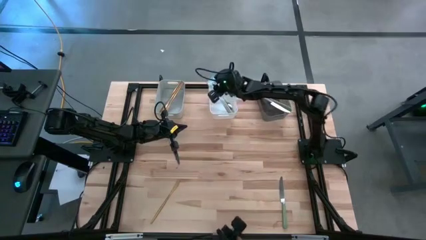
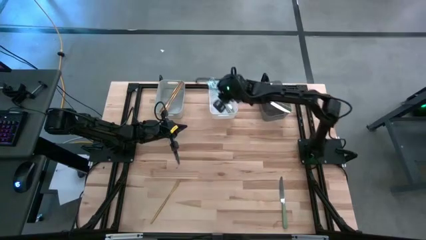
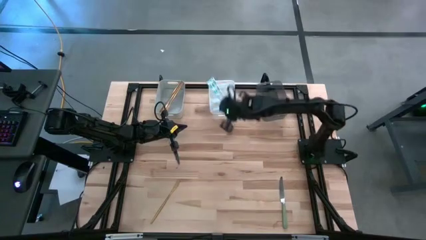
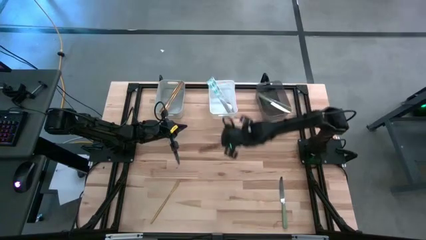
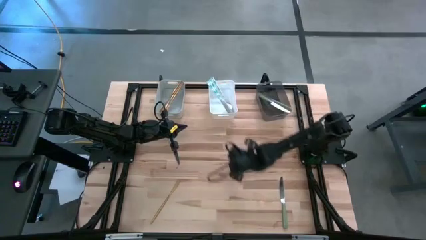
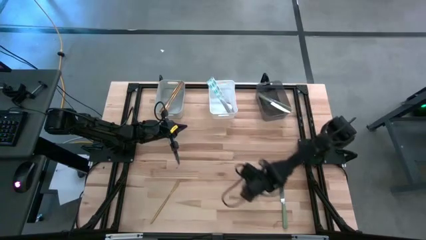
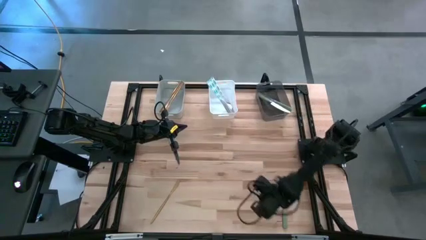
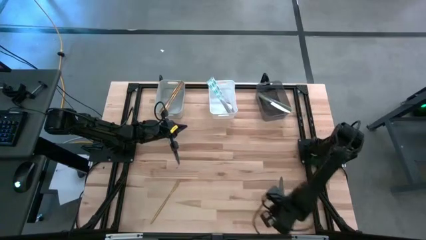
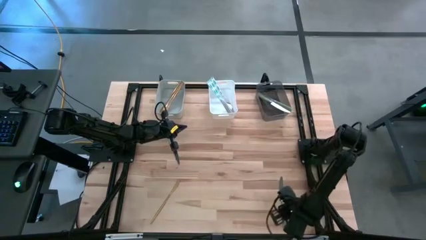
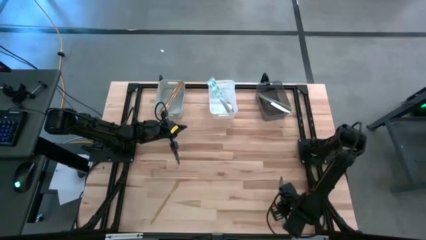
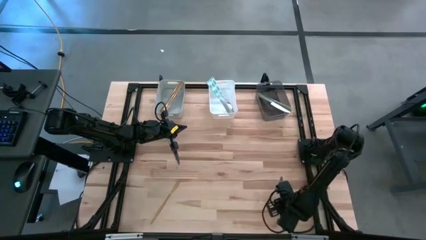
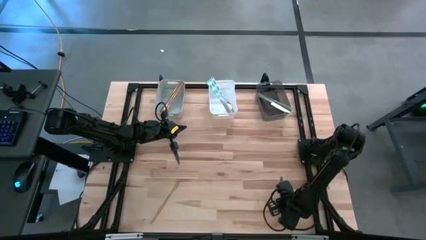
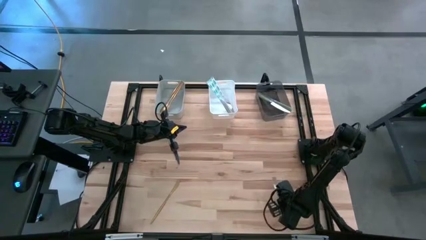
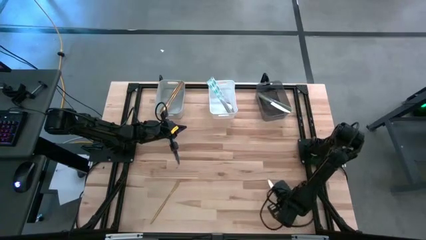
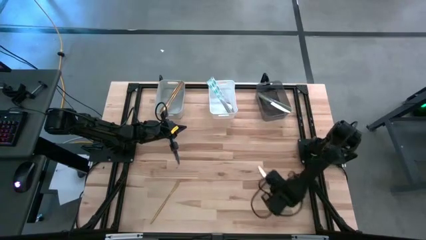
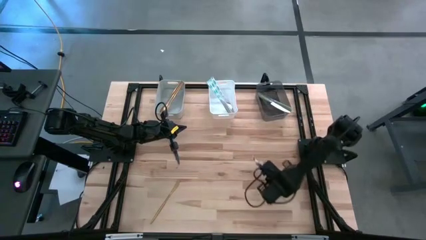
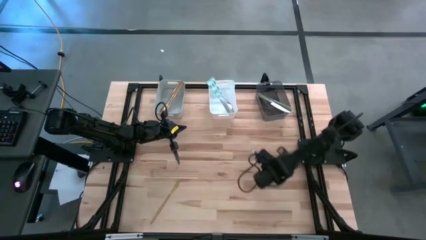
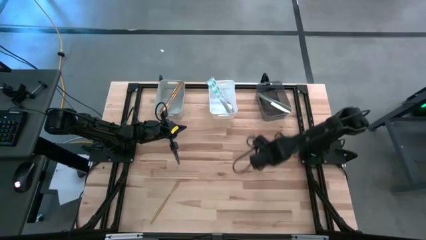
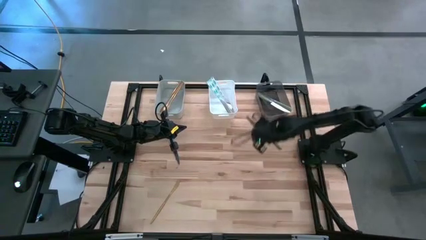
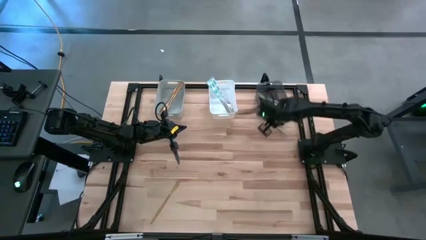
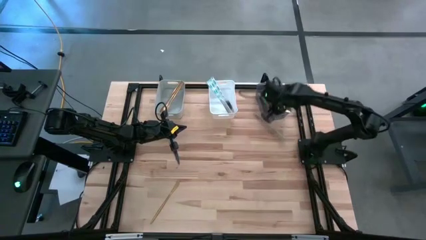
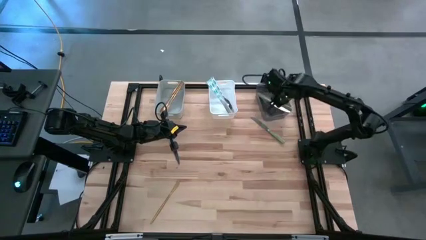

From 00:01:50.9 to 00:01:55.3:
Task: Sort silverware by color (type)
Put the green table knife into the black bin

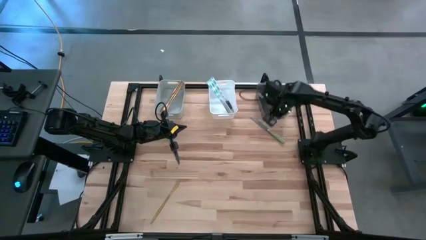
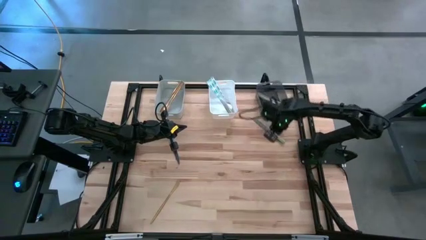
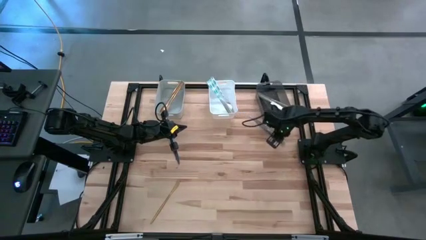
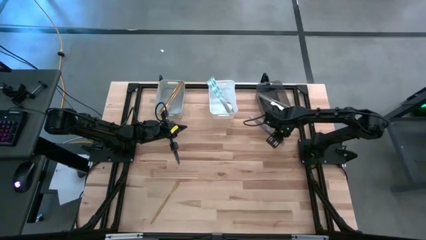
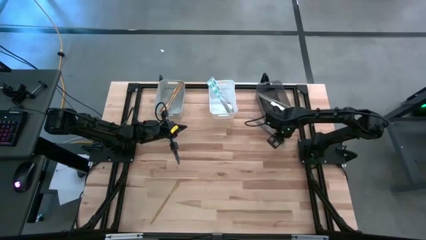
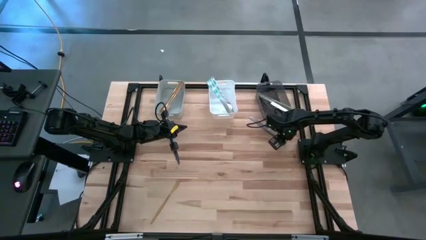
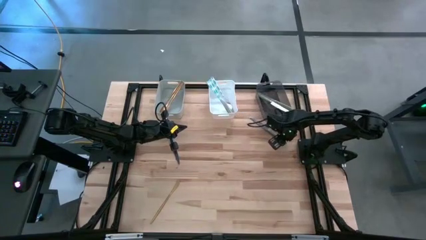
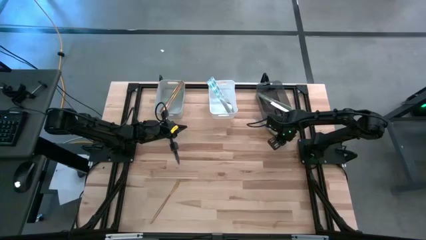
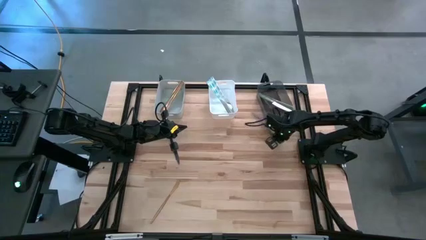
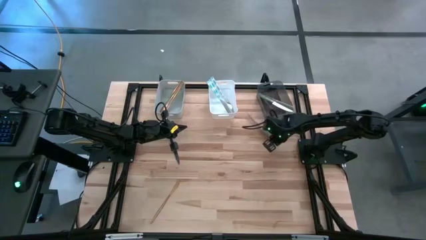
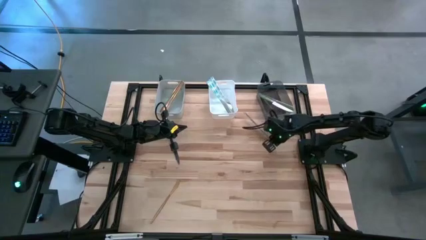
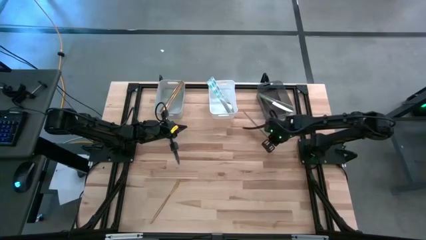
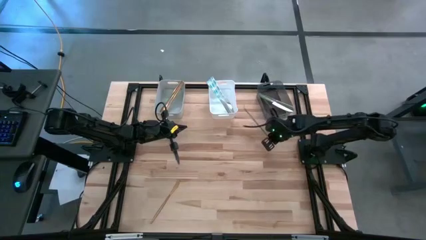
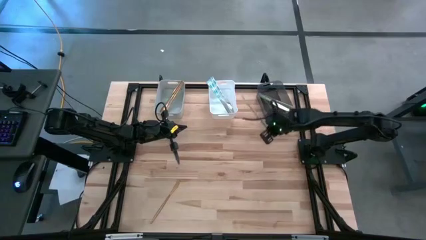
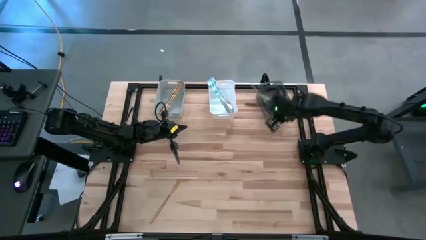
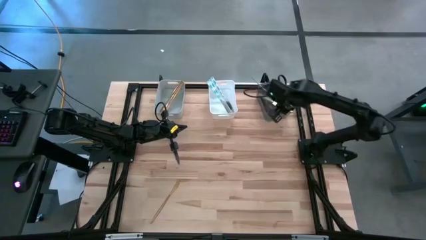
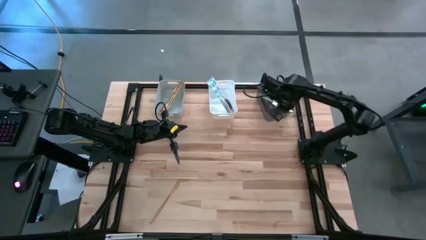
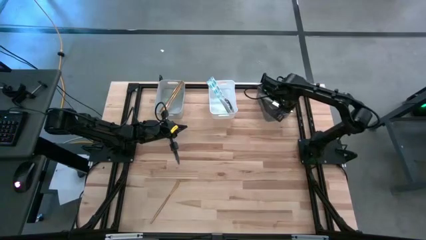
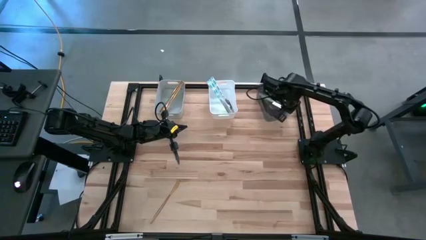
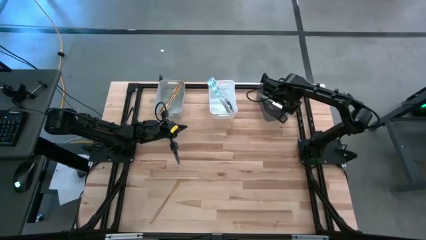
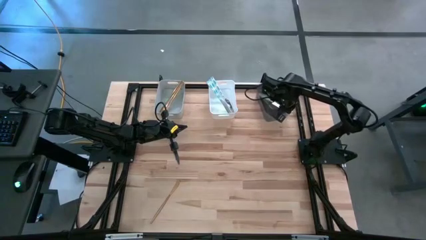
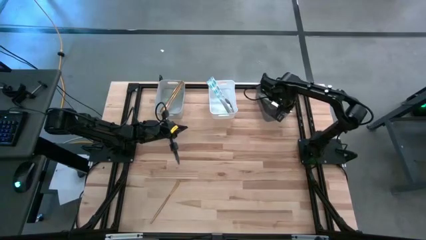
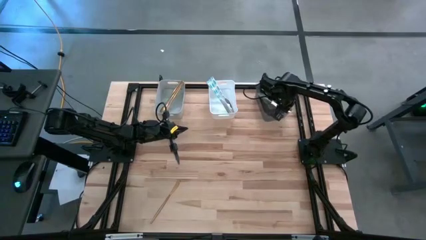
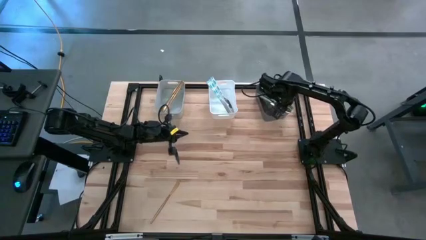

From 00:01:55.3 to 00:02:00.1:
Put the green table knife into the black bin

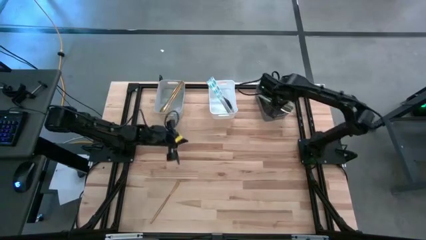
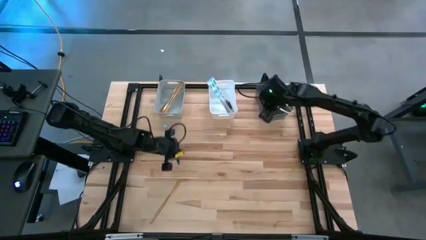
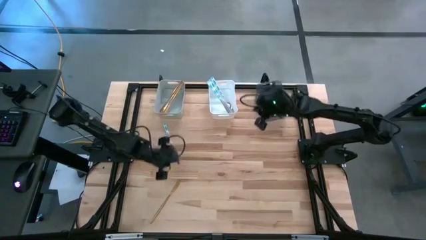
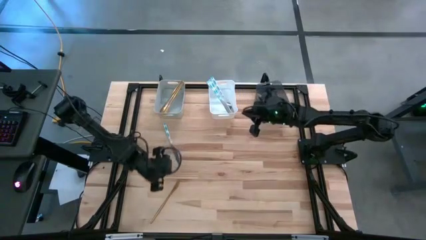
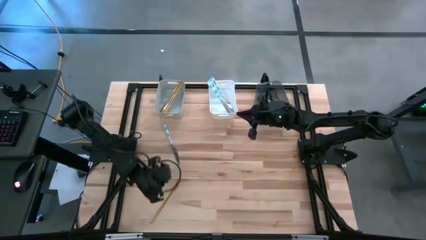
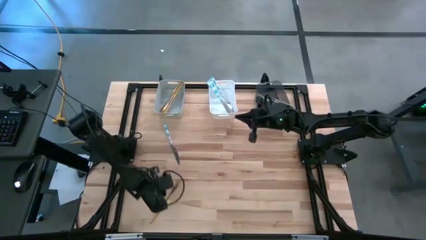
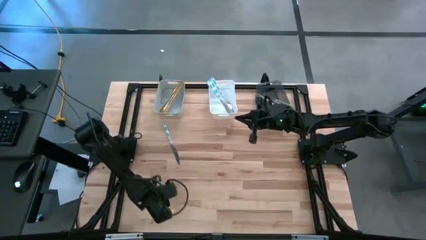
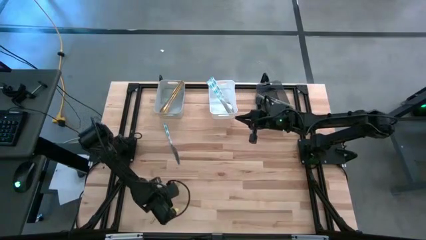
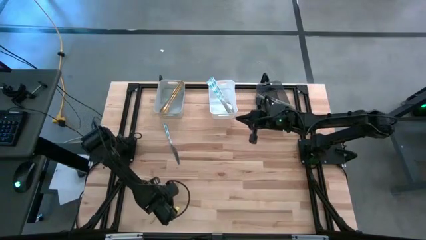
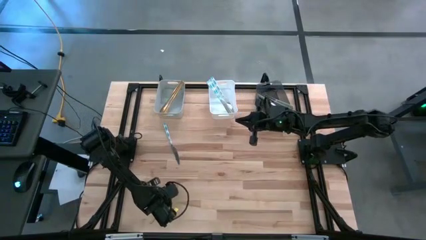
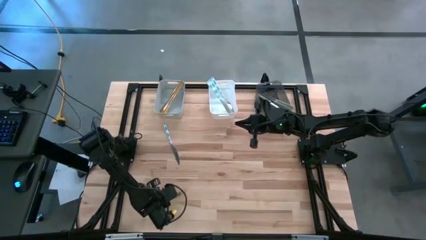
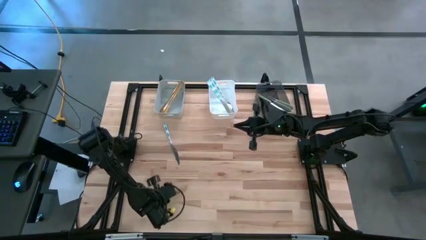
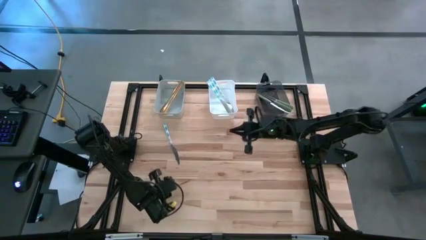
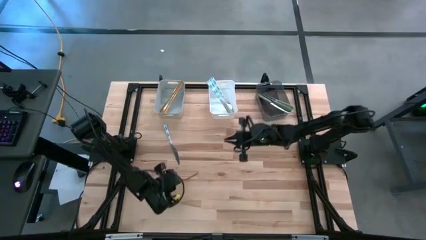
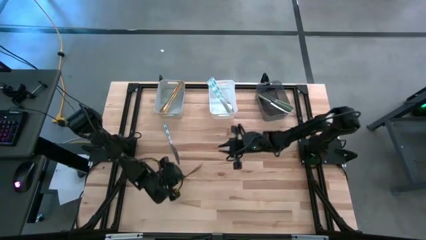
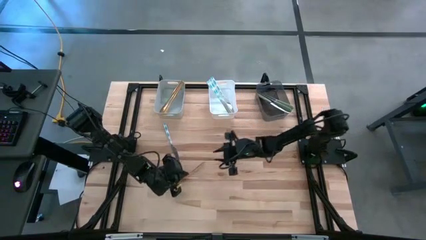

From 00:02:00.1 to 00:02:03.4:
Put the gold table knife into the gray bin

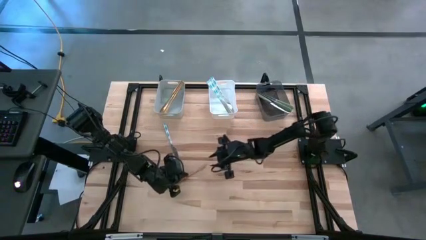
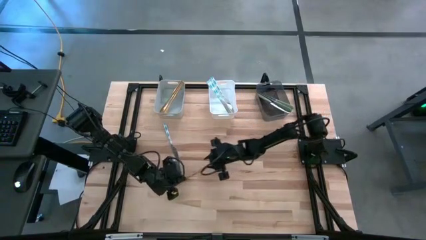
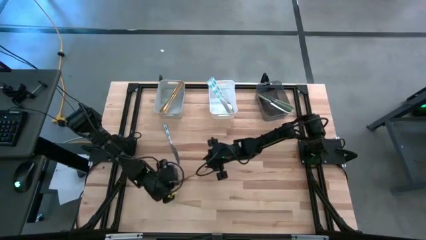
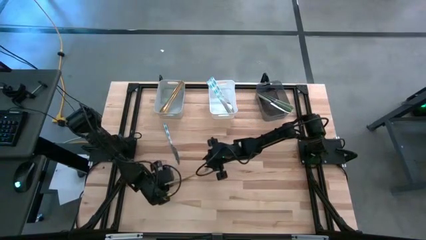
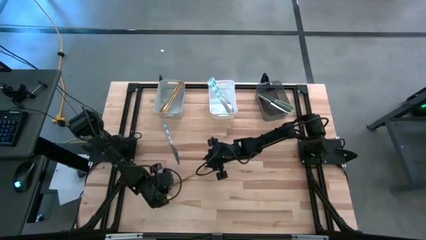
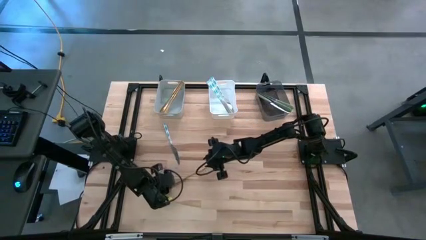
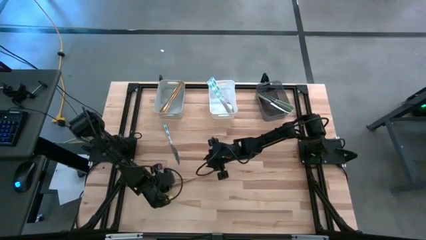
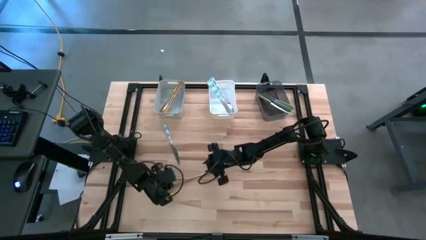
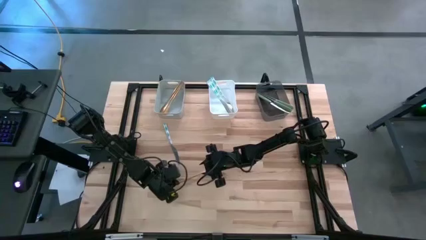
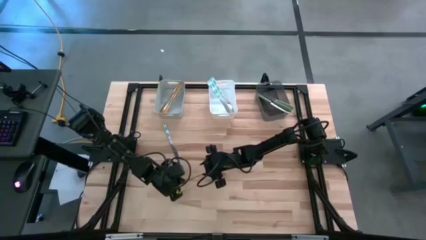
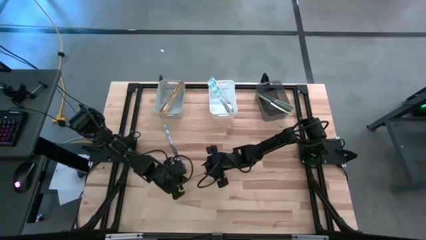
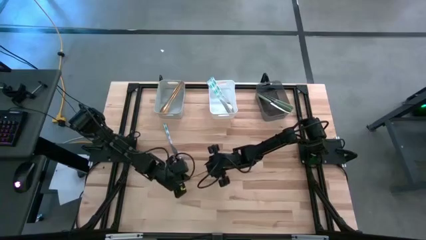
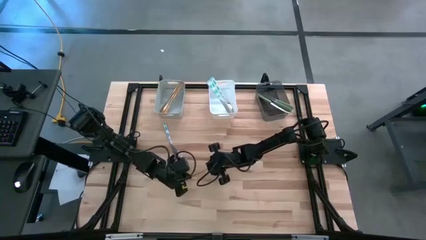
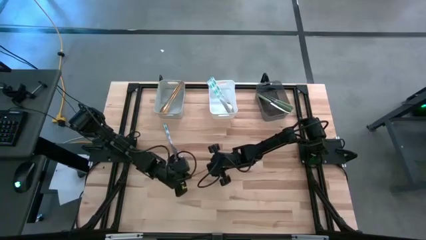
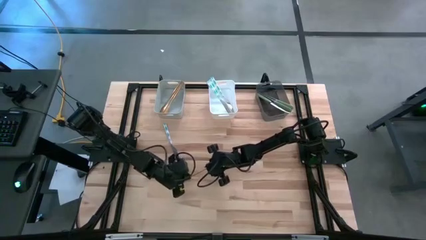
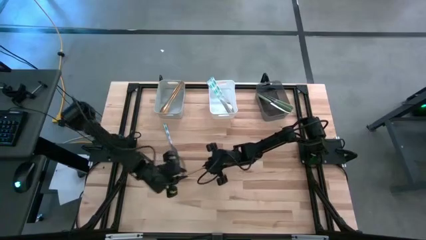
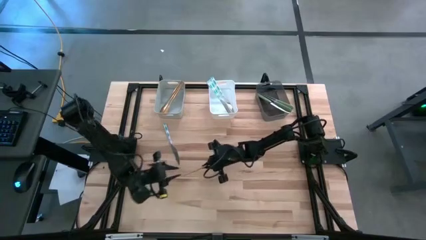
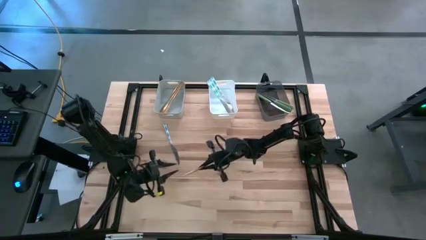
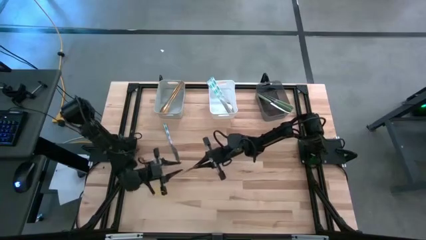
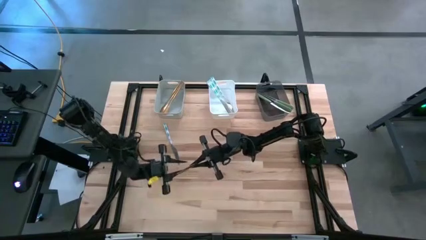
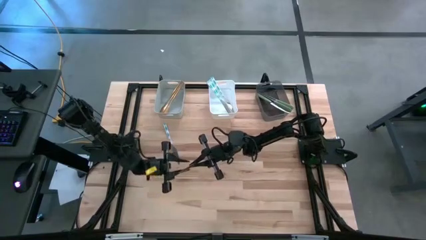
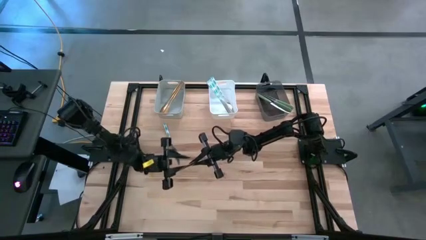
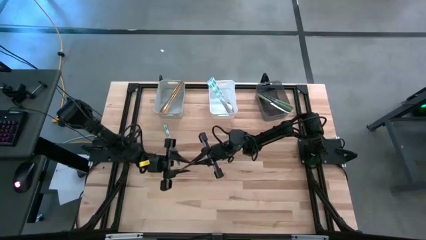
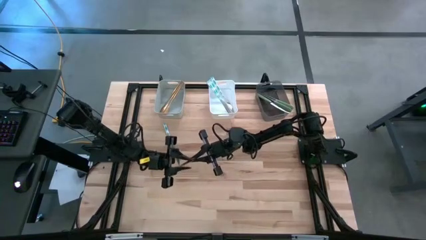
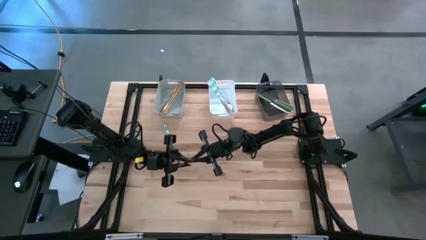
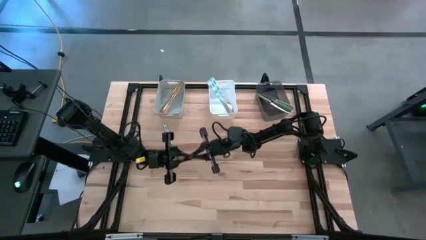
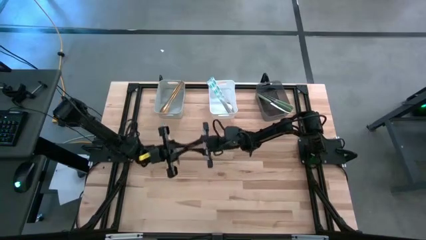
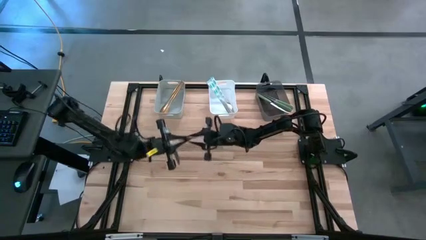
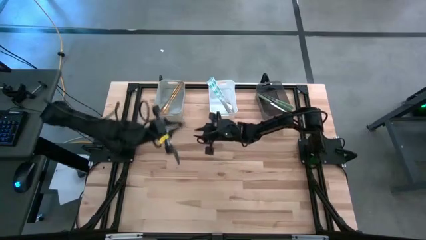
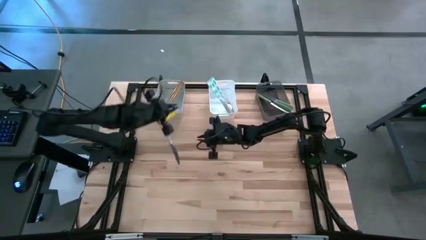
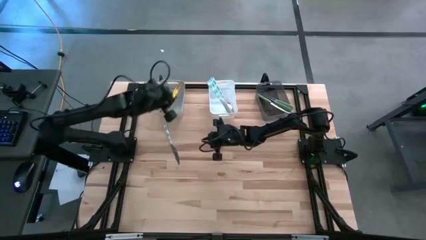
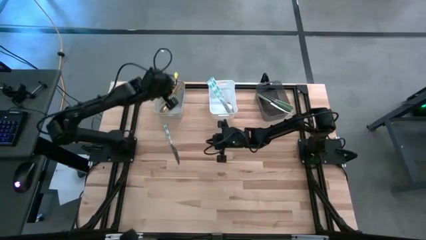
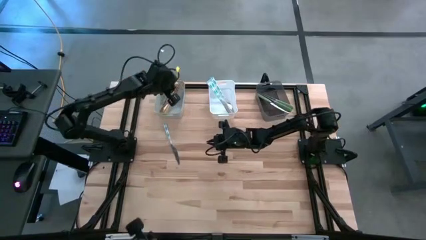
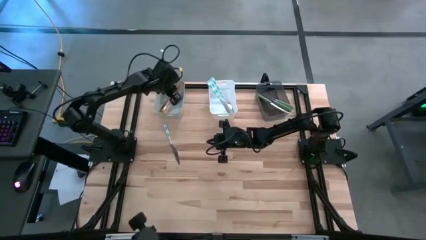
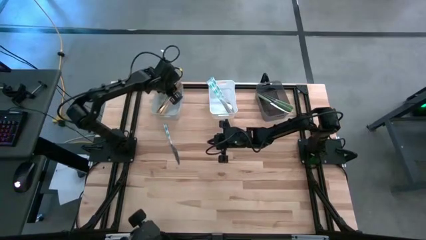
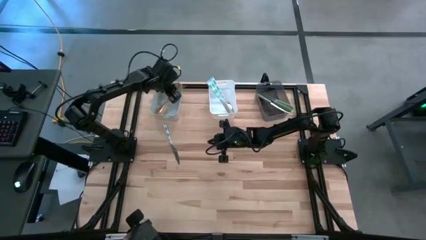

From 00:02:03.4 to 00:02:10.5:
Put the gold table knife into the gray bin
